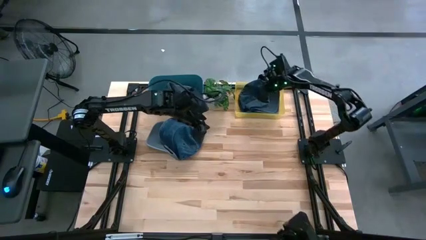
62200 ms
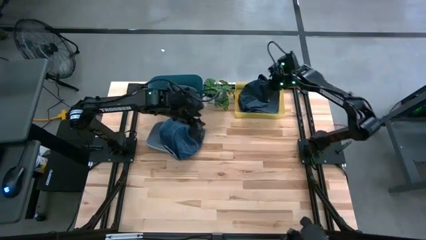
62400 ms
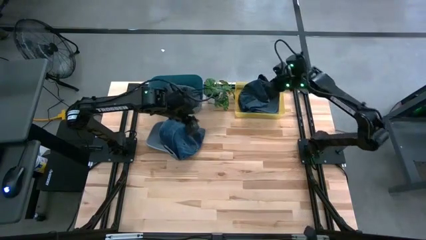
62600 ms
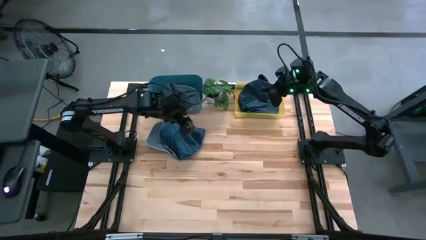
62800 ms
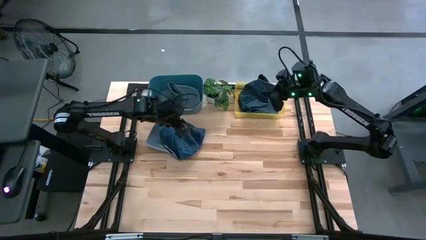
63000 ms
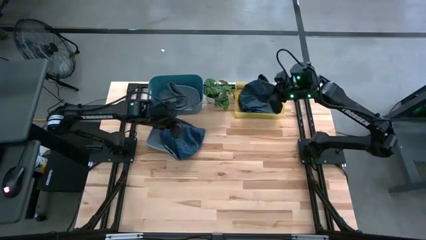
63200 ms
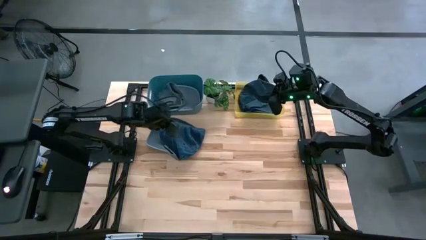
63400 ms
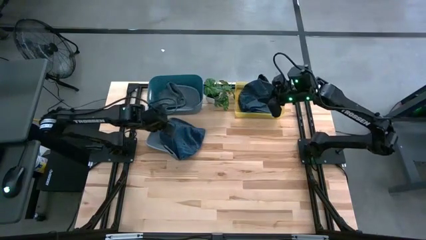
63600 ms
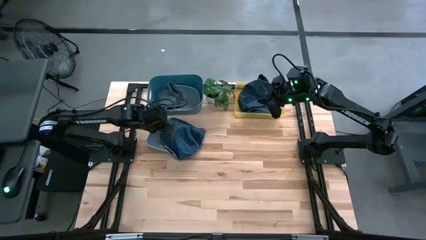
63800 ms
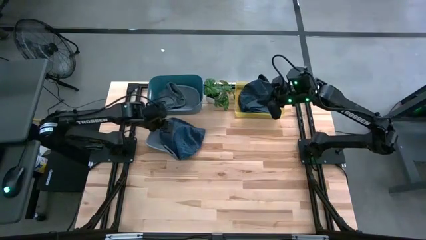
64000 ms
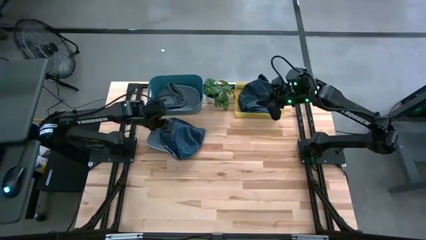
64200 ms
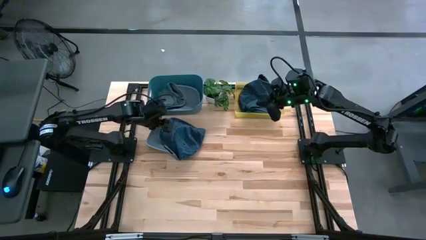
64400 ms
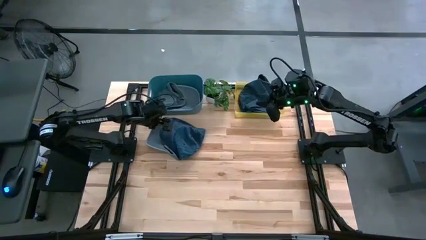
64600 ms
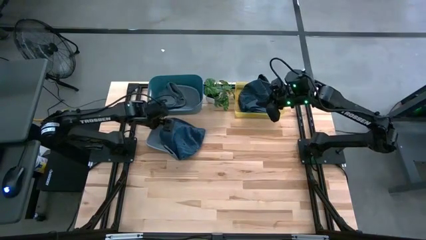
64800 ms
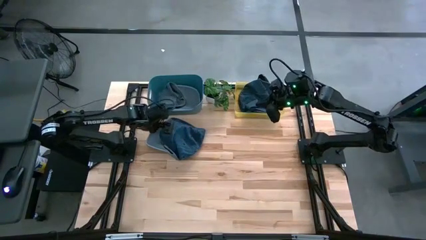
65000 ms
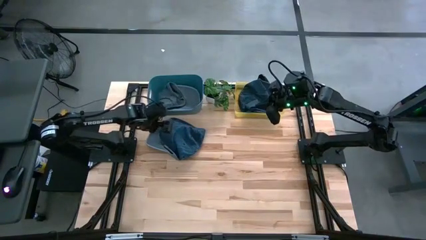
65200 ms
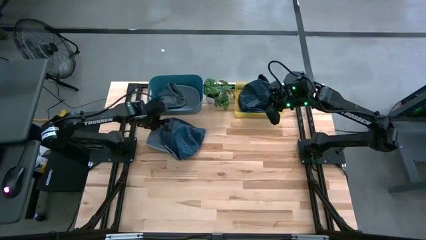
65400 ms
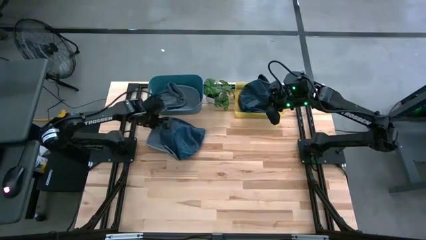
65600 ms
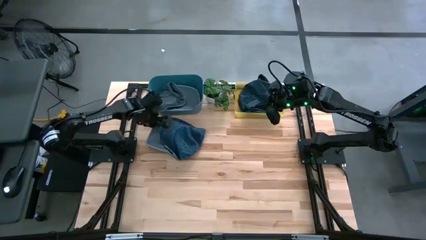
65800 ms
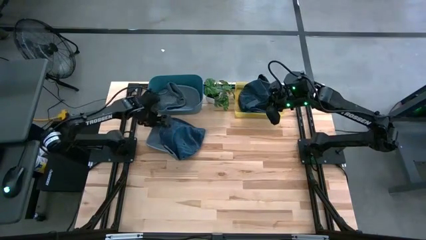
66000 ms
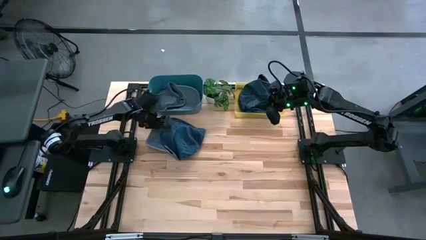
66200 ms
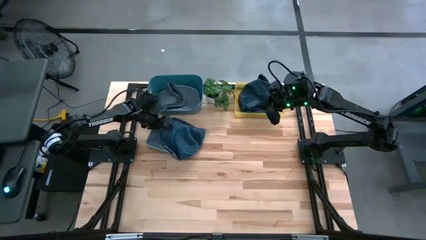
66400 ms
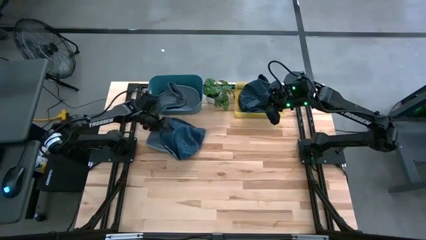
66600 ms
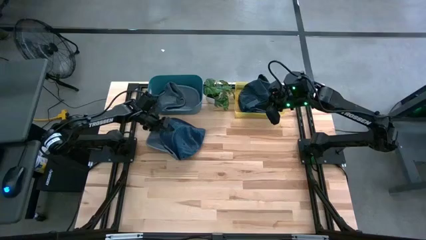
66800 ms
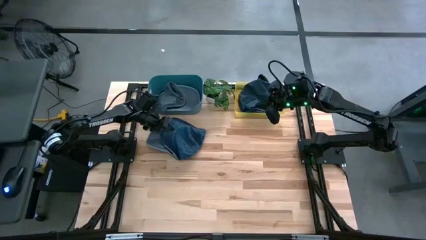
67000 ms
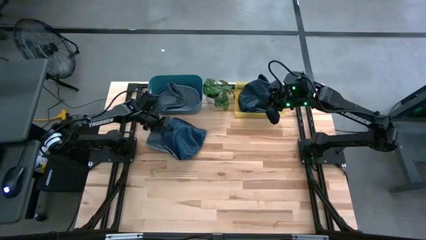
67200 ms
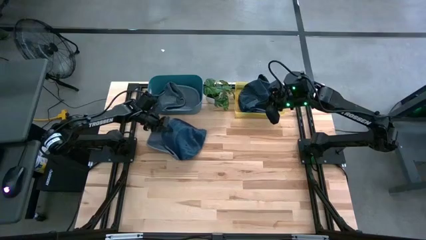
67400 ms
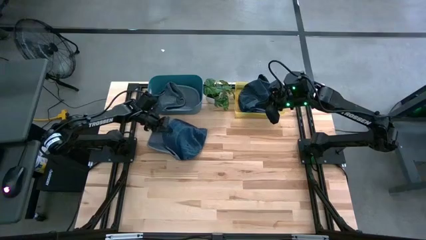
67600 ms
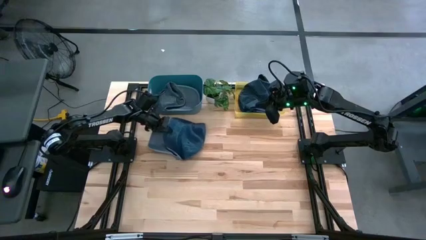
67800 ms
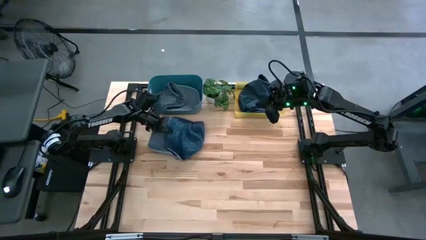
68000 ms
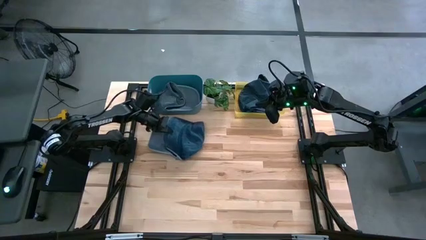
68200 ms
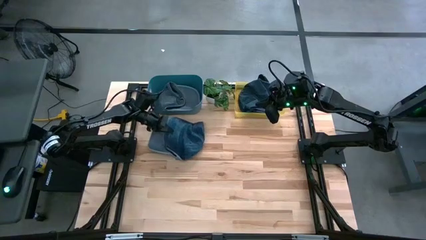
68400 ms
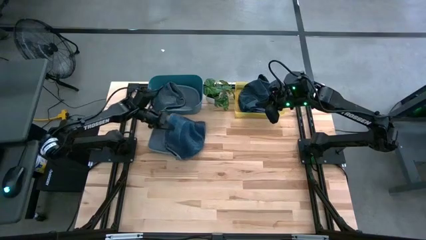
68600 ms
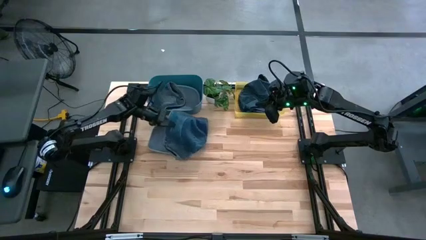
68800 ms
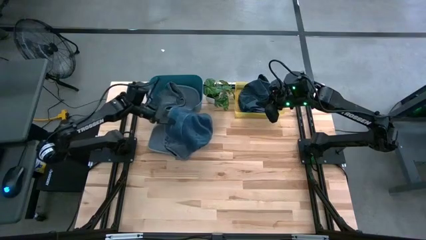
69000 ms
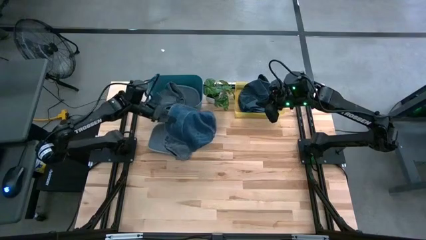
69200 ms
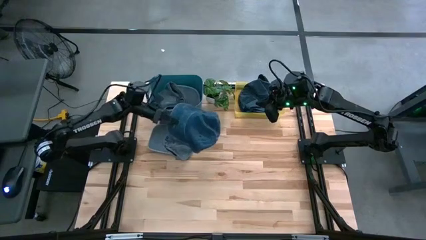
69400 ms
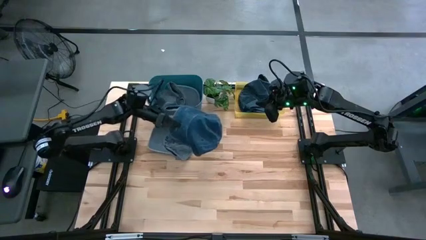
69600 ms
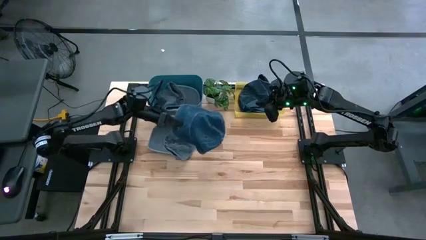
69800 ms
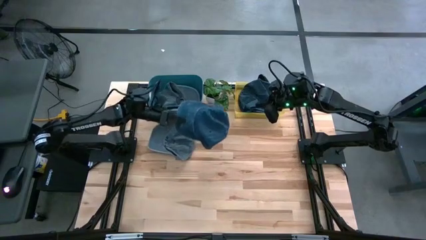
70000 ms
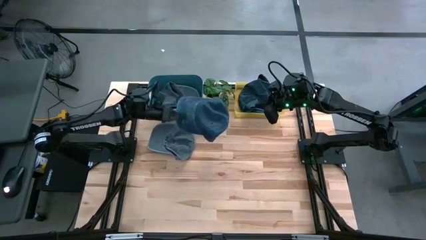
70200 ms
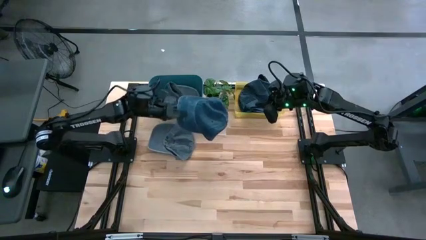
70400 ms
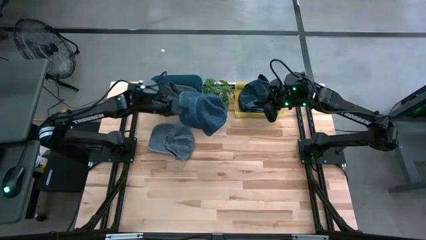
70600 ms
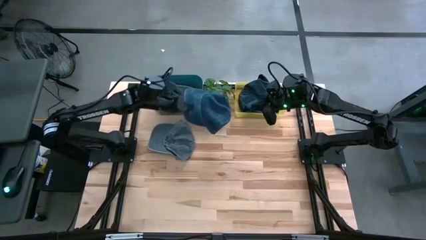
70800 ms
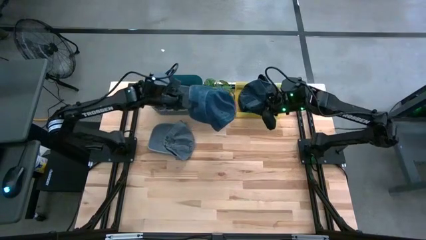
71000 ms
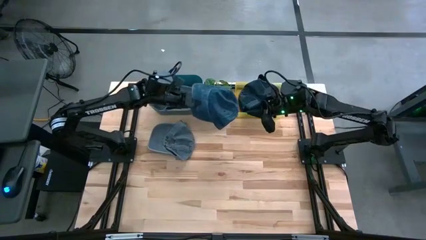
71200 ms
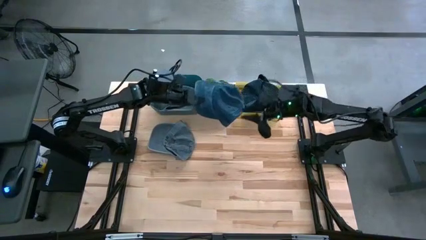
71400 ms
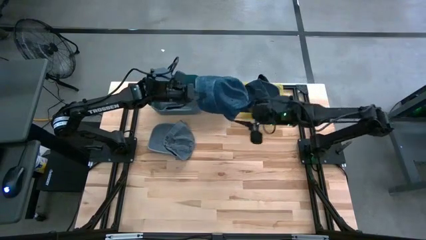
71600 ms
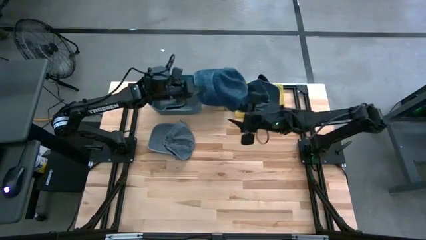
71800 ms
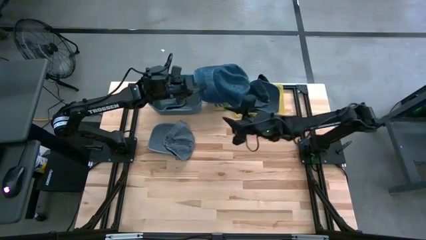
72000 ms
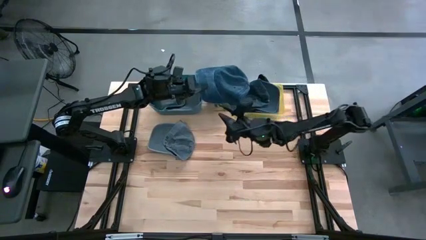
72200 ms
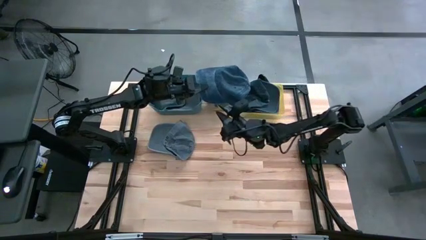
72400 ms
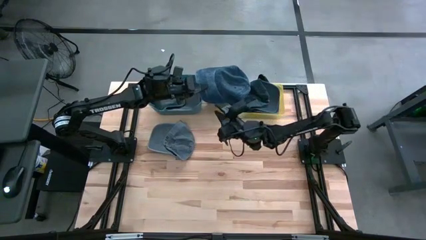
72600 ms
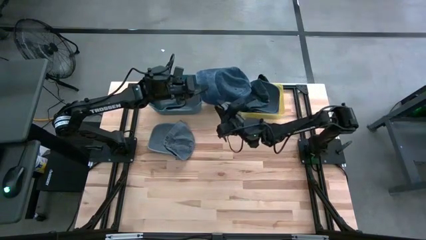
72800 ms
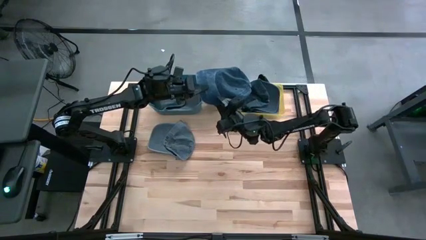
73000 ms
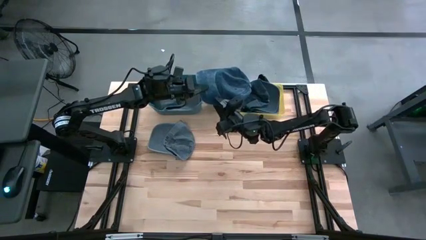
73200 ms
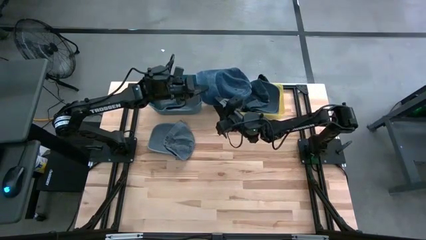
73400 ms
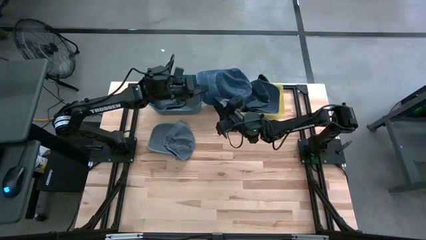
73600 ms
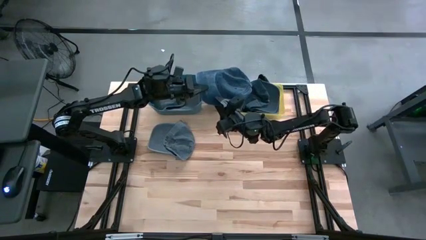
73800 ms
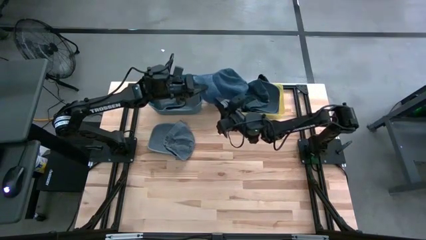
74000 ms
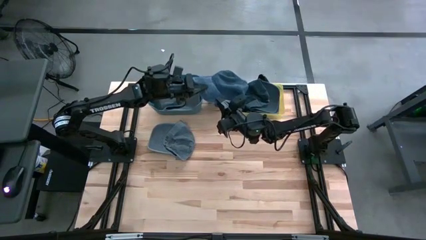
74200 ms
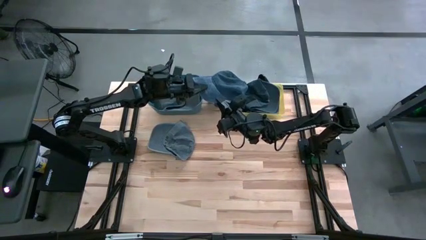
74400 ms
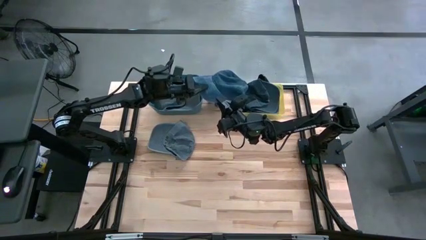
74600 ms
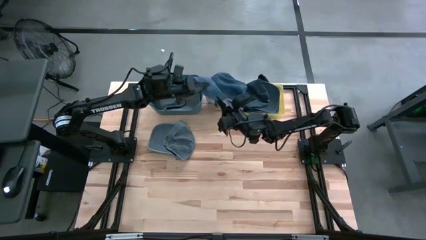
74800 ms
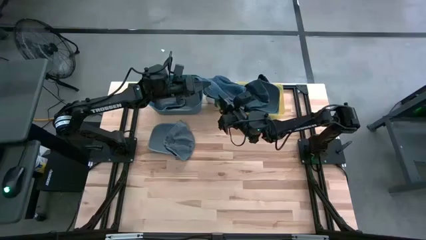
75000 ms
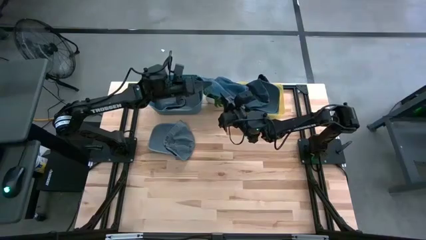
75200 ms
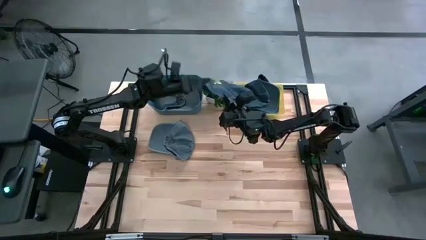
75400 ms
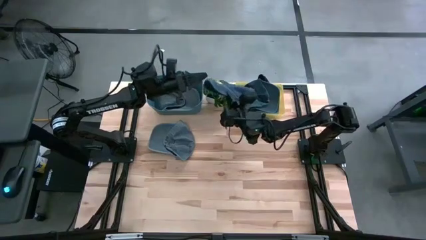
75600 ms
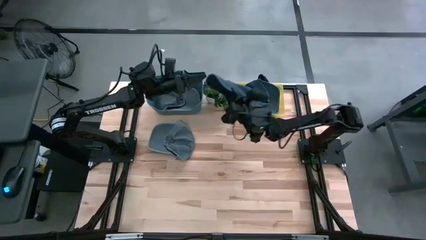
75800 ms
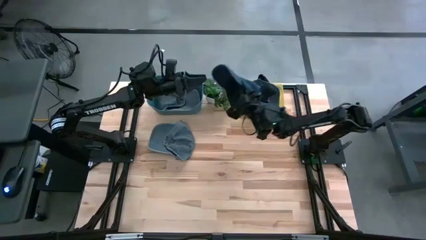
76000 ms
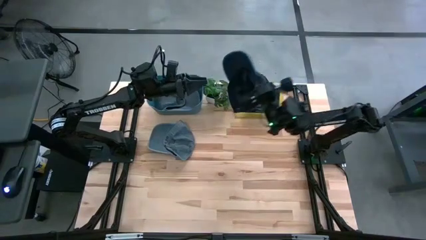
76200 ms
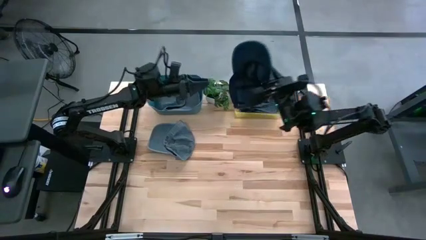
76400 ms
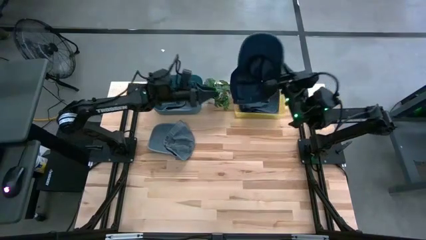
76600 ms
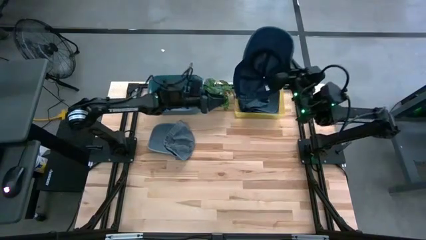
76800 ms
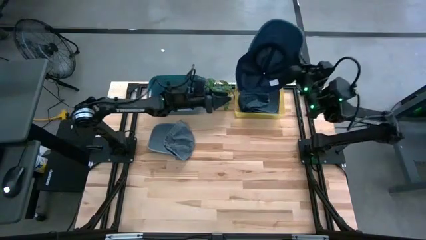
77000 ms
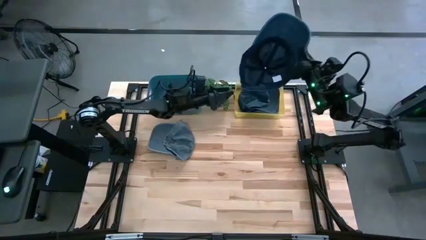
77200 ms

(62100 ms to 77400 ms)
Task: Pick & Place hat
Put the blue cap into the yellow bin

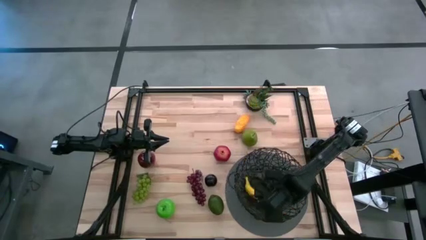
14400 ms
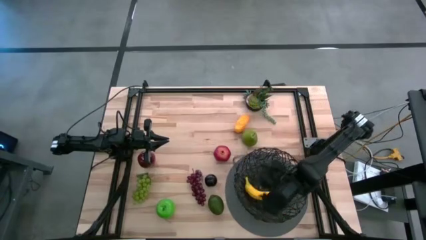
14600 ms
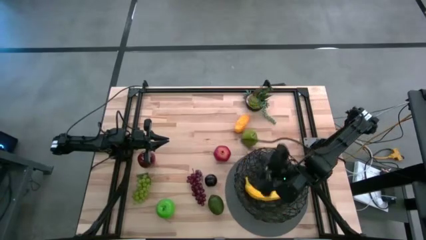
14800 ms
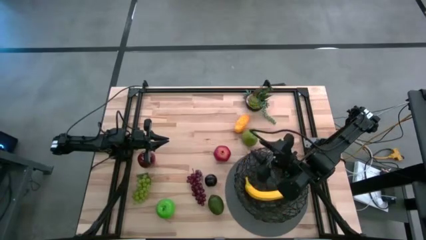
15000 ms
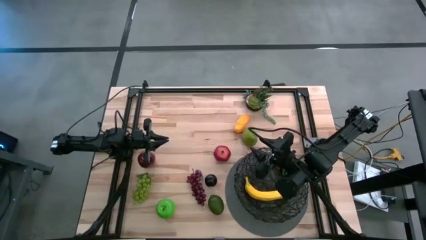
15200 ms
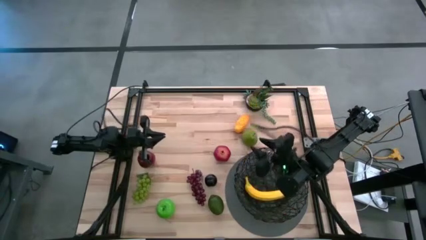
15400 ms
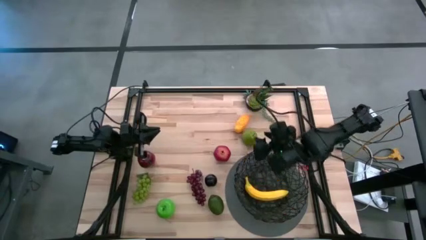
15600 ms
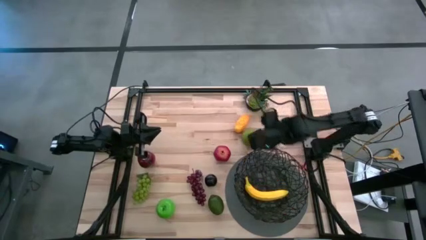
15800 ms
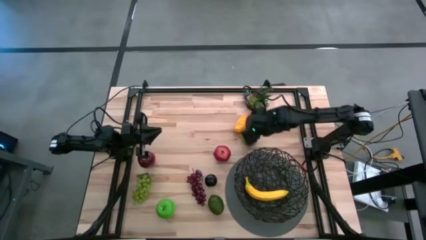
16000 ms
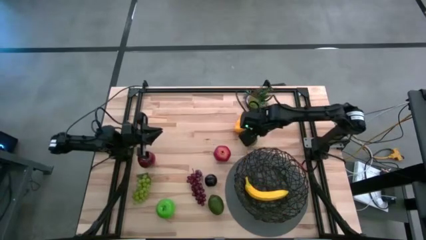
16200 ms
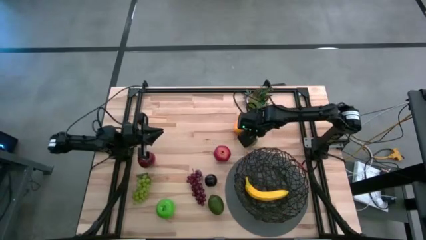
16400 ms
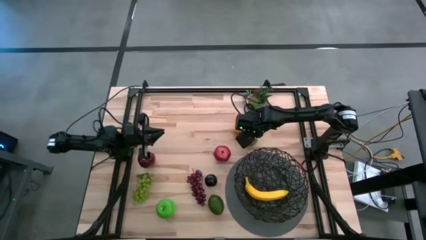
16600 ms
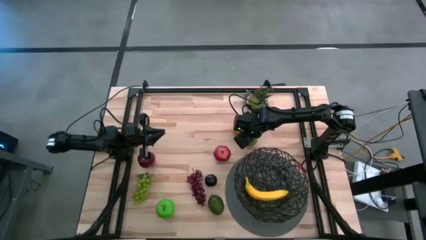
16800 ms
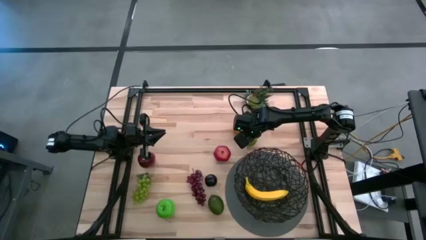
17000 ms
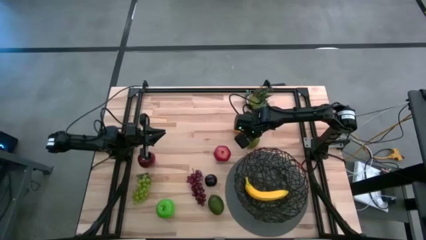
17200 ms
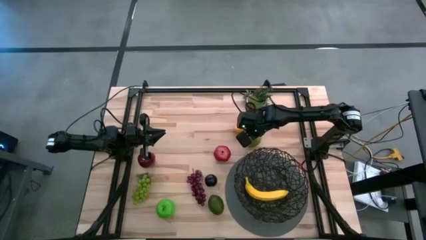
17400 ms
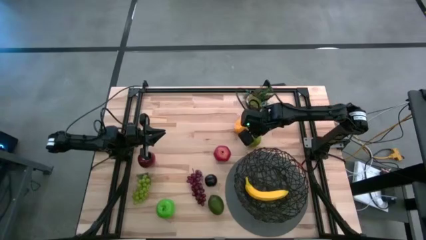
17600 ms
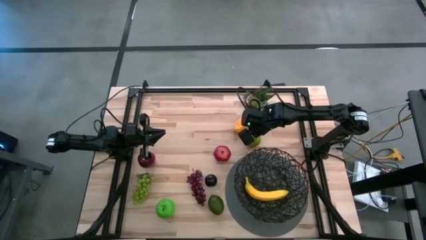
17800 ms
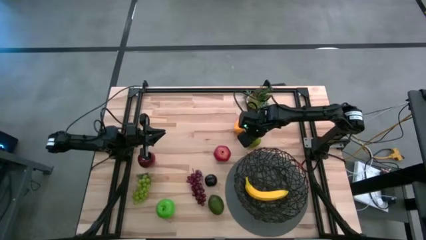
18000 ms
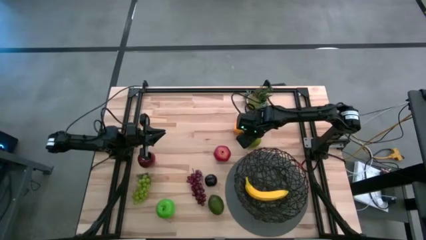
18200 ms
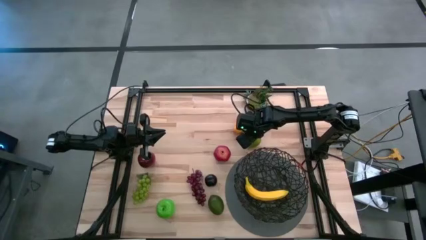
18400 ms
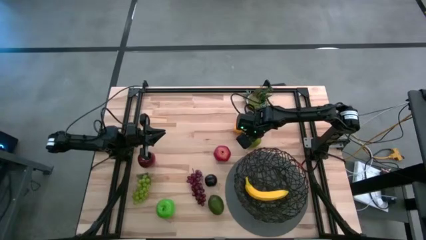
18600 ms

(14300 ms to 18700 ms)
Task: Build produce basket
Put the pear into the black wire basket
